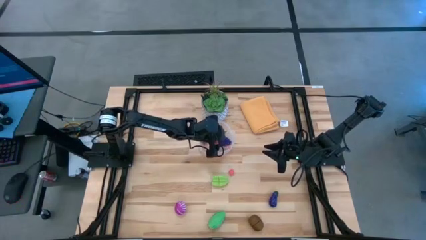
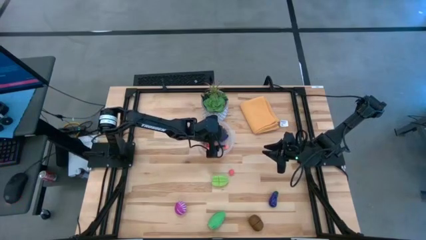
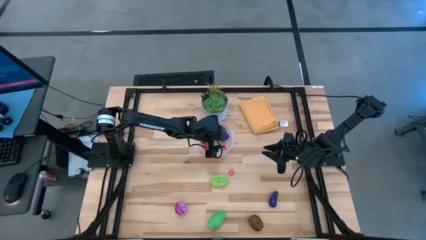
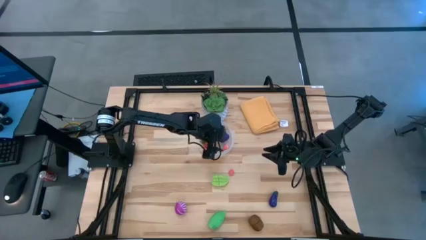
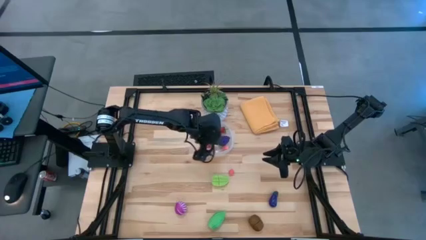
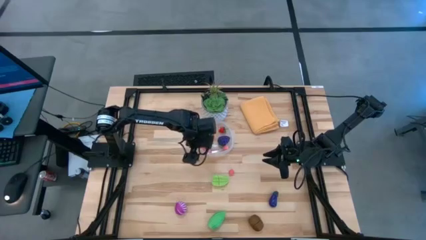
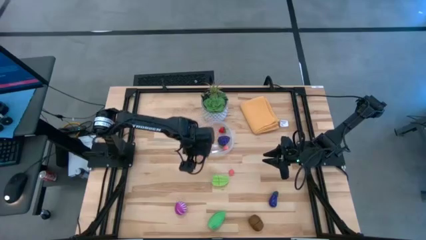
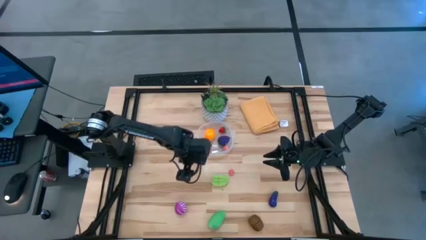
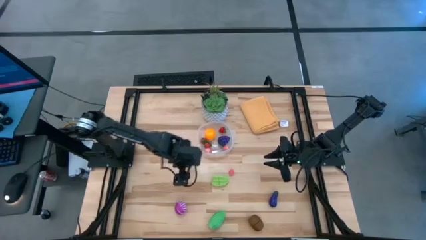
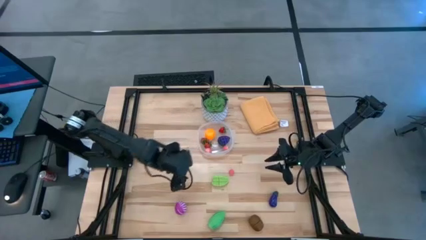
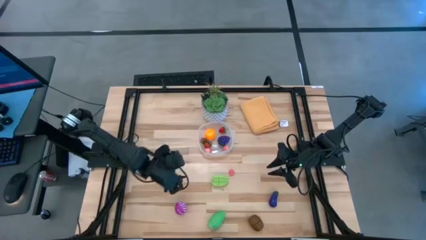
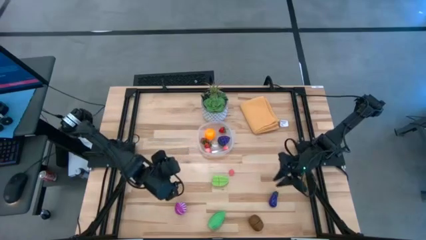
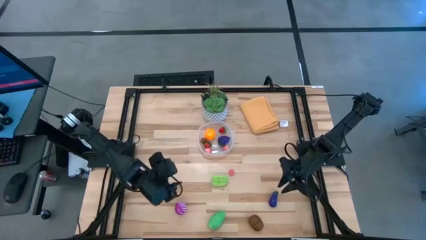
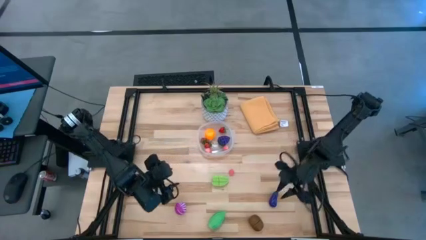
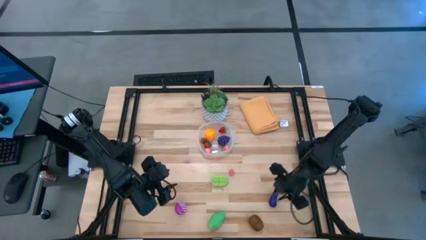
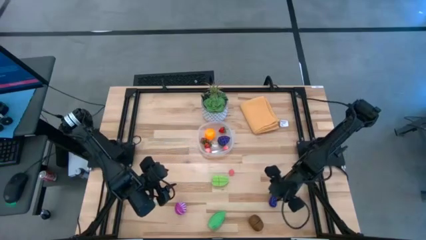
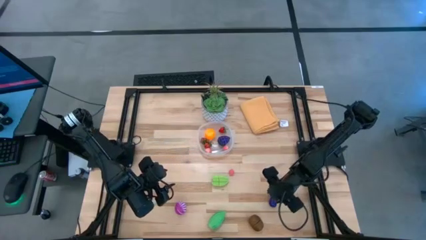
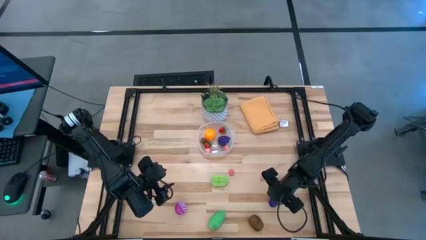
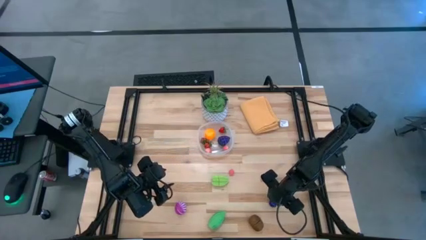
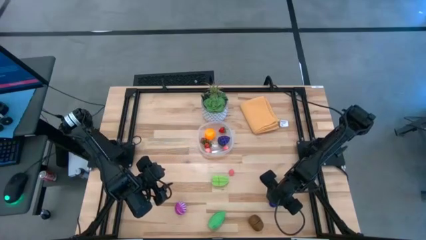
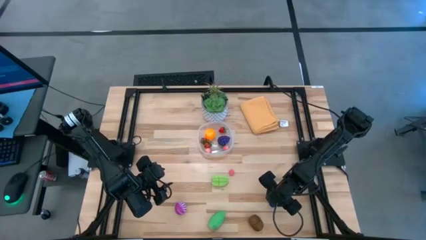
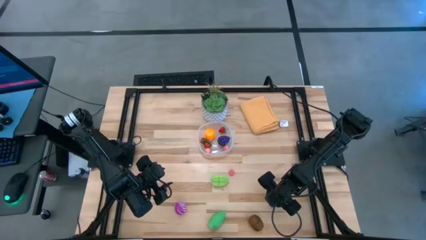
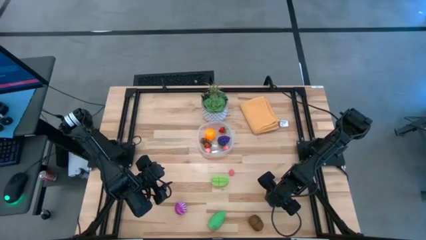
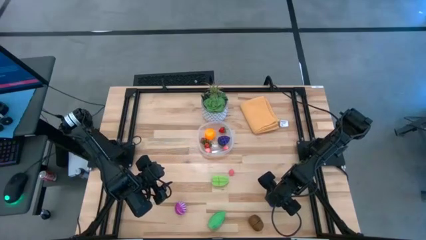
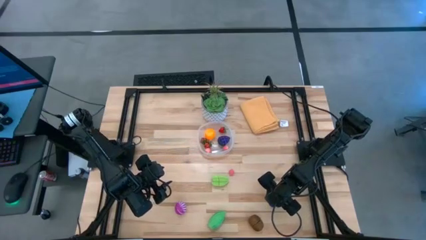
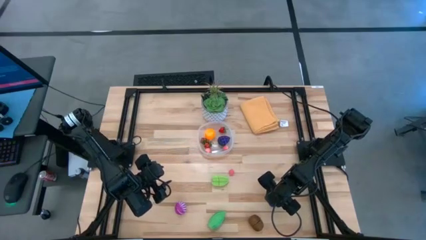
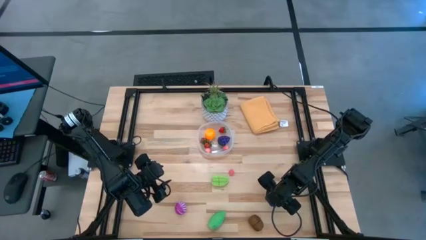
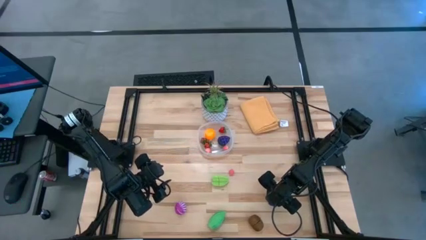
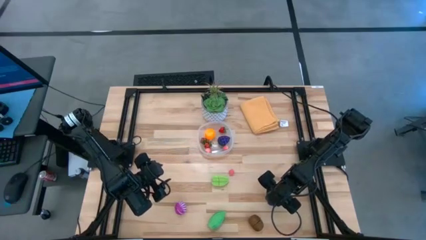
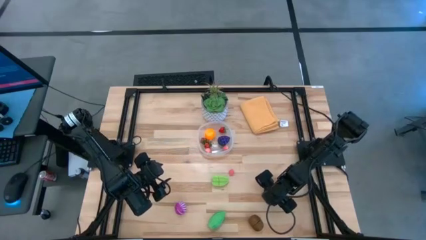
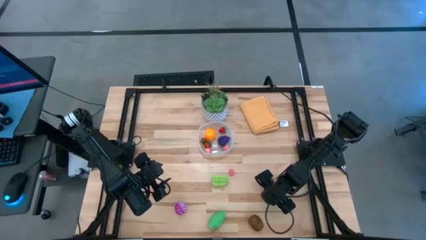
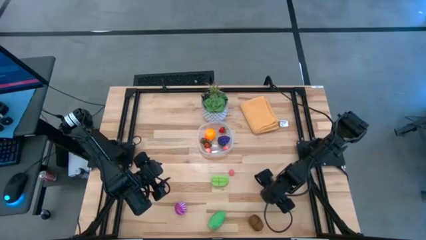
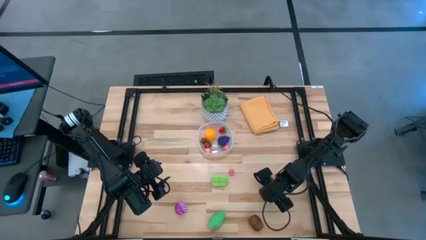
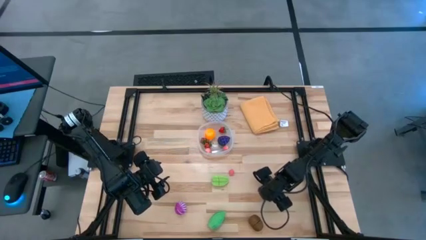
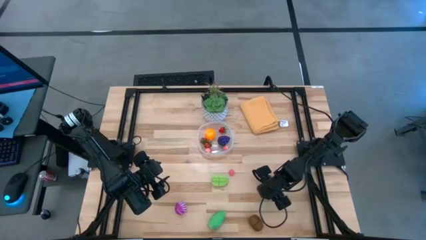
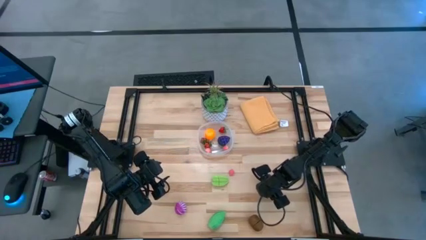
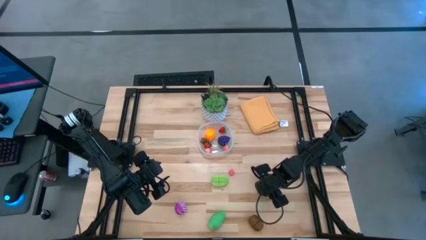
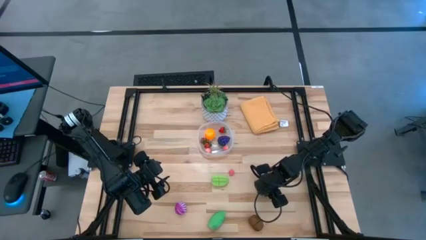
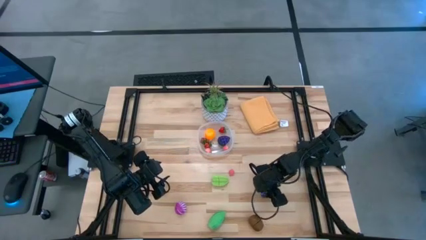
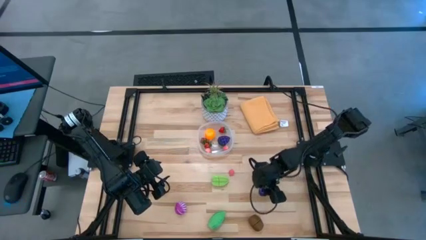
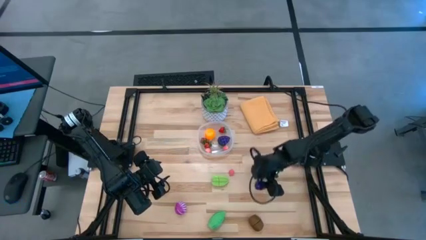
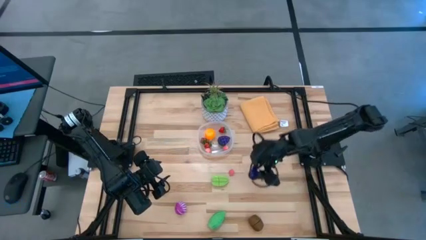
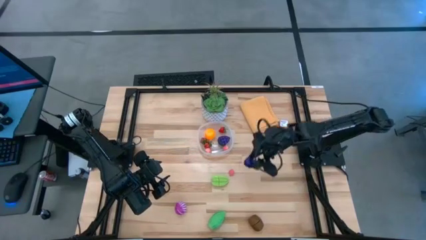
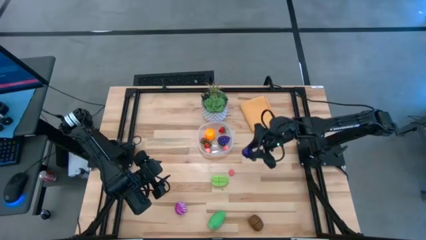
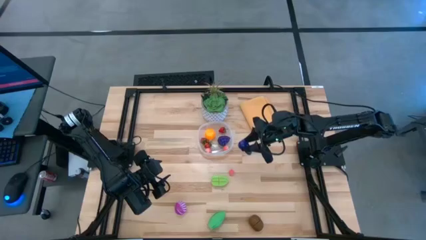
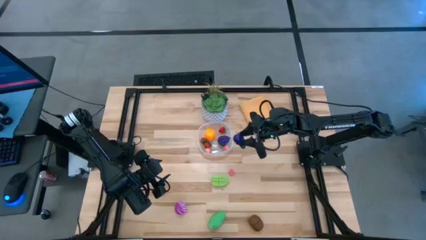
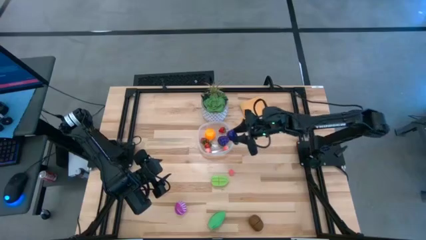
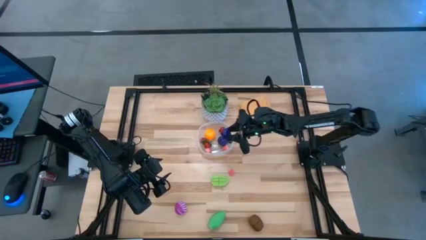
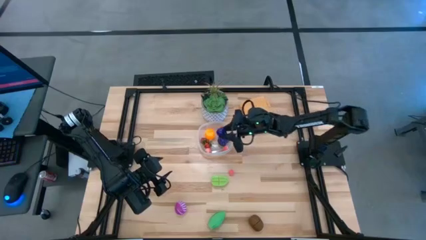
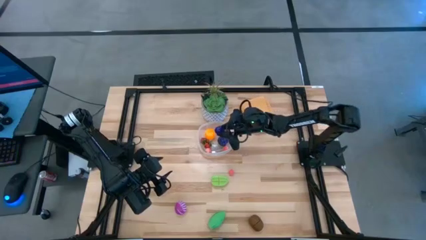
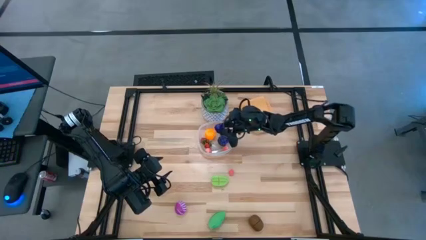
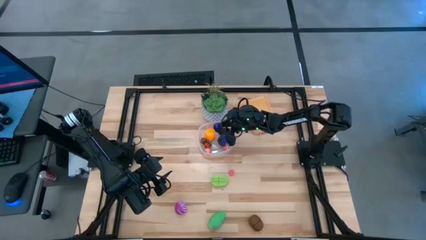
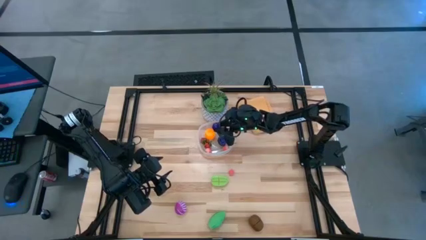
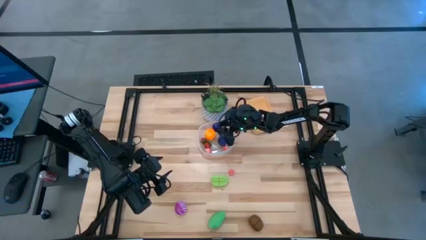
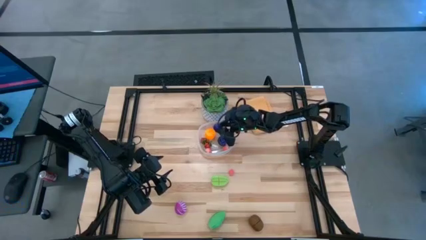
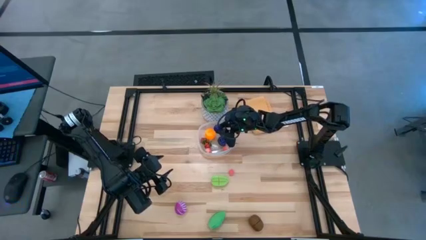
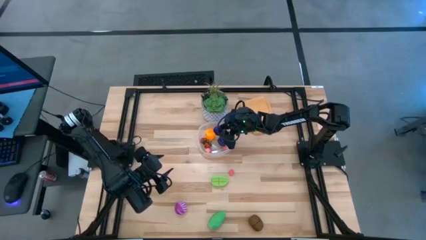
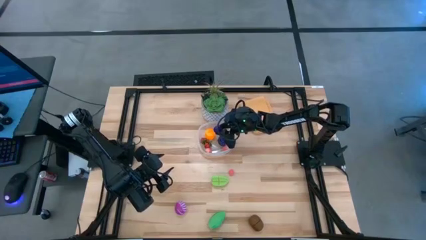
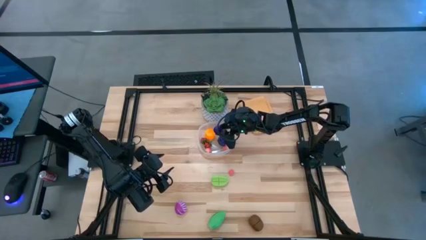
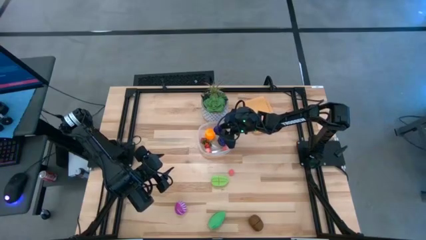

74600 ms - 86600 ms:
Task: Pick and placing Produce into tupperware
Put the purple eggplant into the transparent bin
